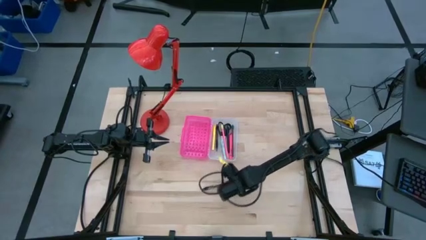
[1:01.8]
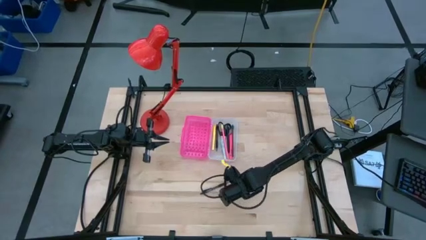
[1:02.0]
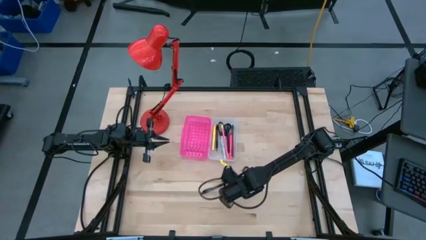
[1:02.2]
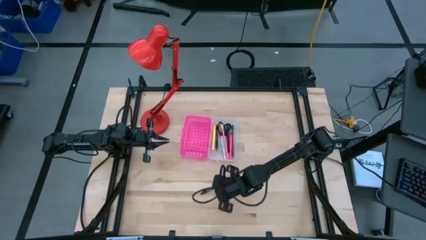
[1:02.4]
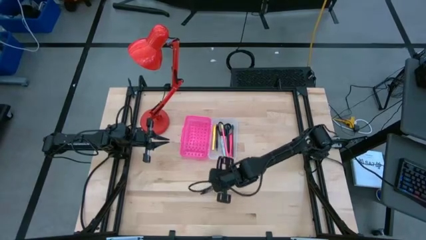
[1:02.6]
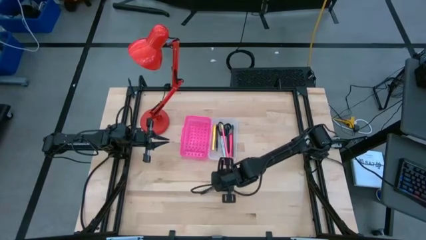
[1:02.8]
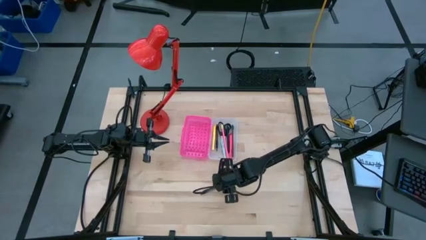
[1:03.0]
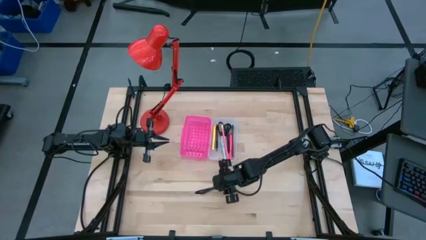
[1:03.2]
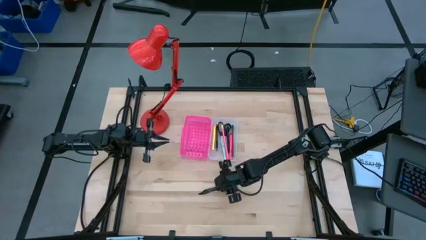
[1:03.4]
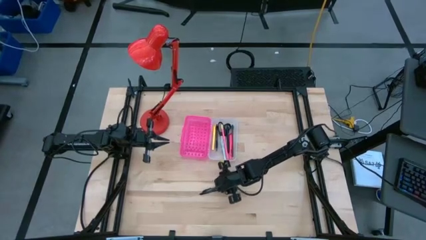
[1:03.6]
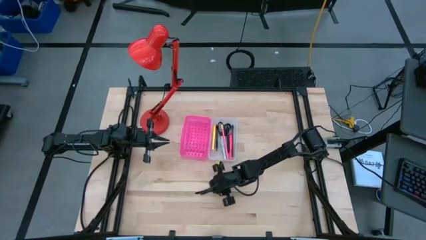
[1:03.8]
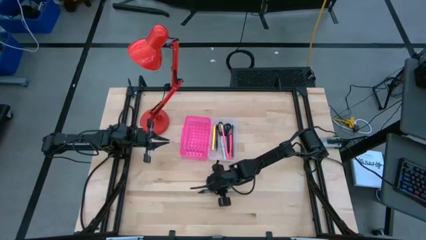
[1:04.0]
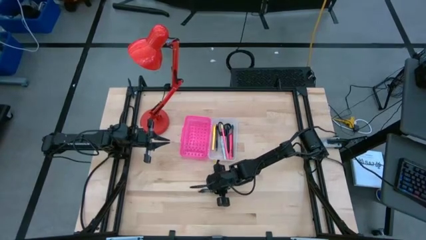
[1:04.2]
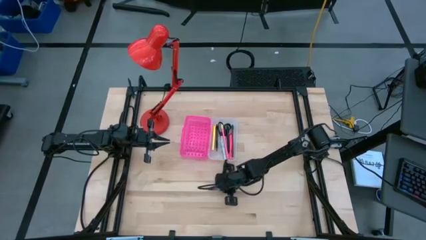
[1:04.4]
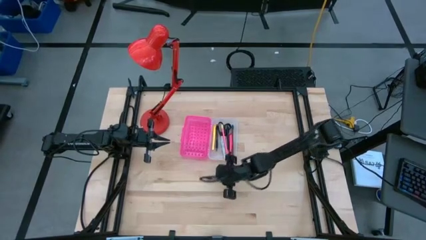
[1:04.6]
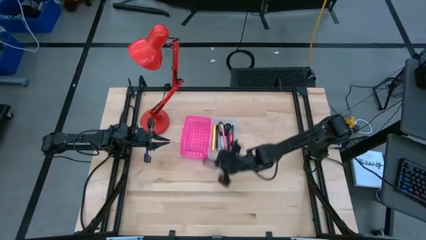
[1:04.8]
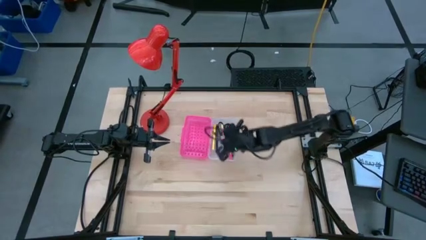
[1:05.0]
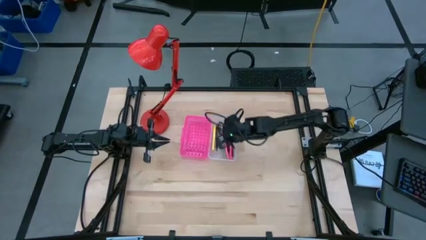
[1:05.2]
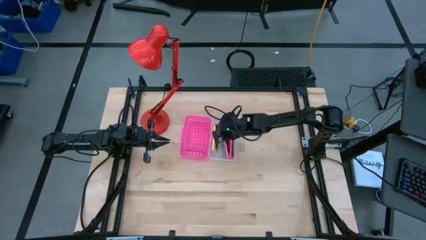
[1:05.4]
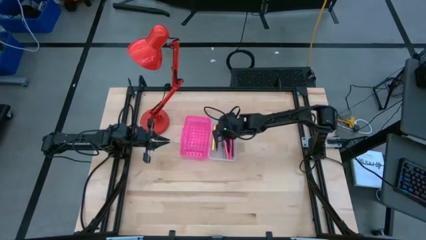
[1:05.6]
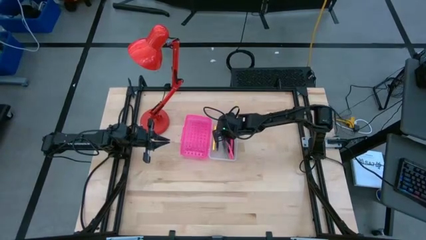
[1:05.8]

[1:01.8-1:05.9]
Task: Pick & place school supplies into a supply box
Put the black pen into the supply box

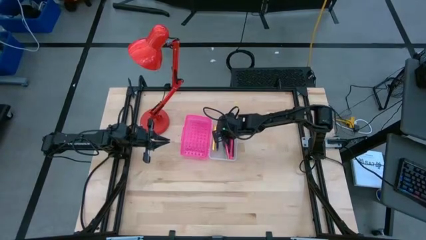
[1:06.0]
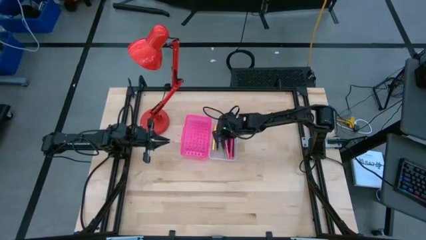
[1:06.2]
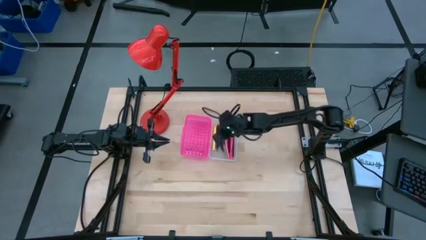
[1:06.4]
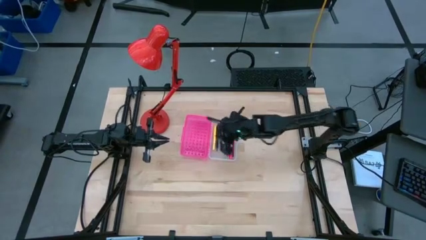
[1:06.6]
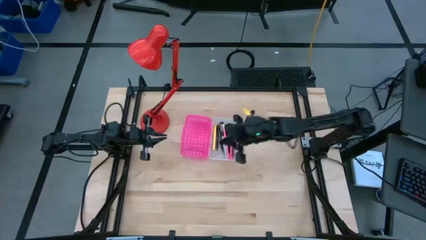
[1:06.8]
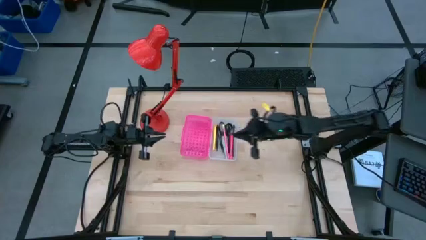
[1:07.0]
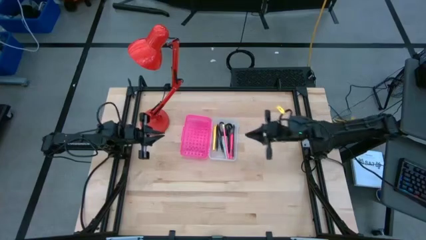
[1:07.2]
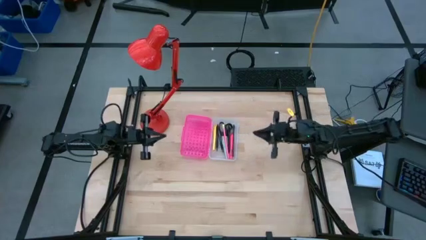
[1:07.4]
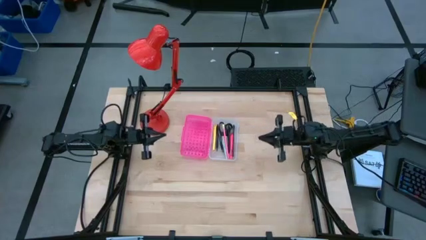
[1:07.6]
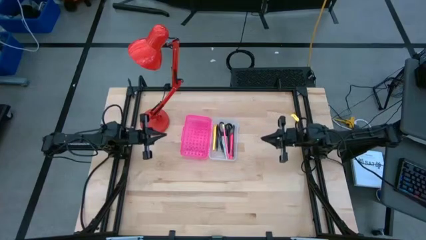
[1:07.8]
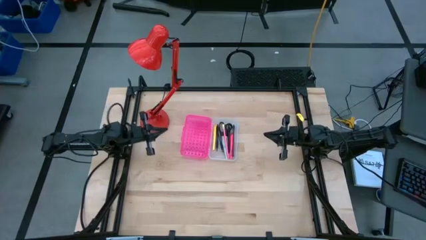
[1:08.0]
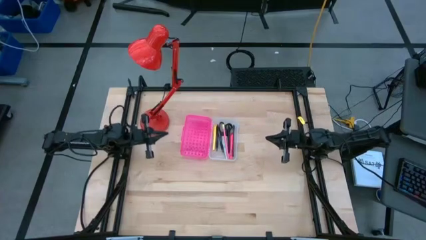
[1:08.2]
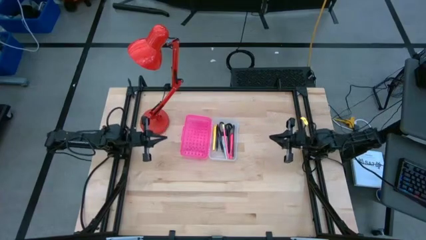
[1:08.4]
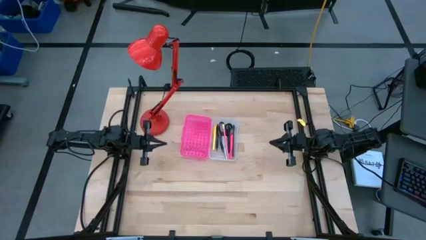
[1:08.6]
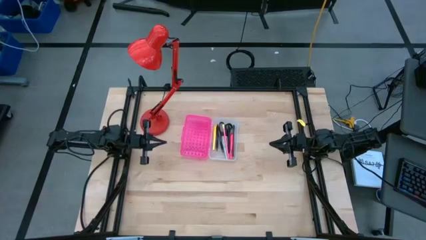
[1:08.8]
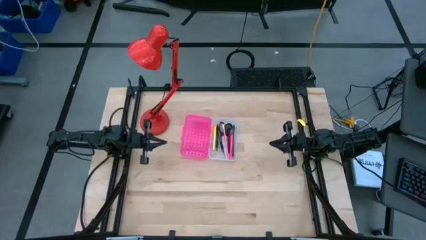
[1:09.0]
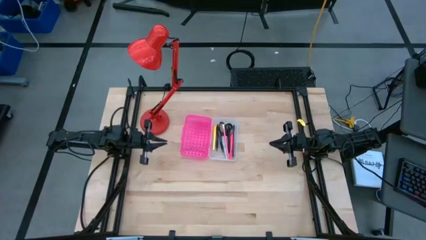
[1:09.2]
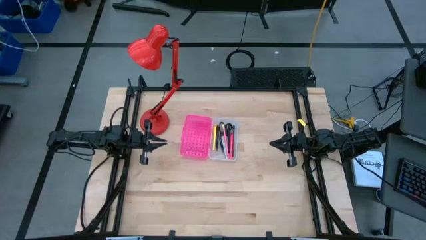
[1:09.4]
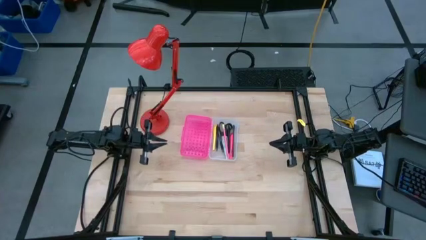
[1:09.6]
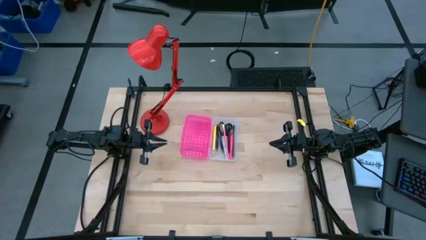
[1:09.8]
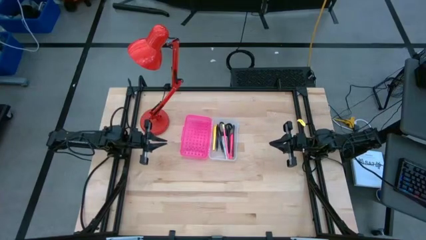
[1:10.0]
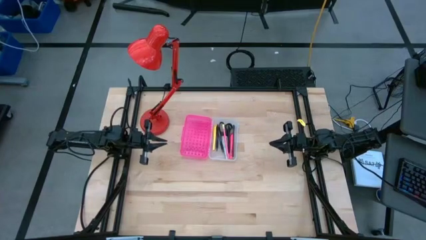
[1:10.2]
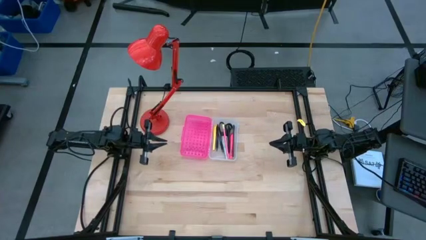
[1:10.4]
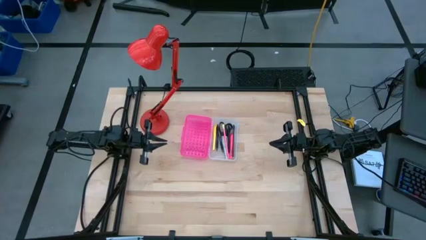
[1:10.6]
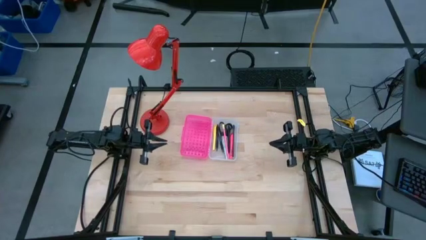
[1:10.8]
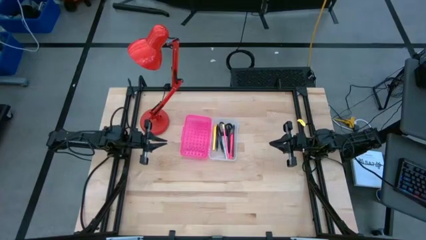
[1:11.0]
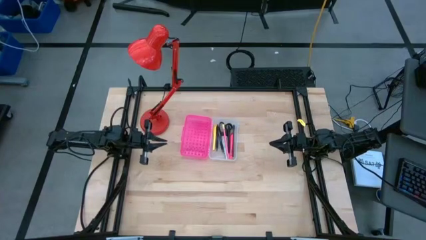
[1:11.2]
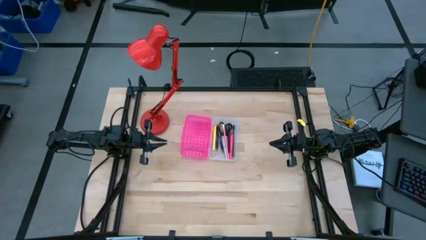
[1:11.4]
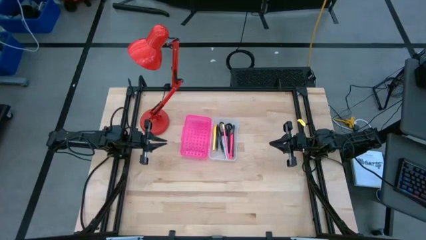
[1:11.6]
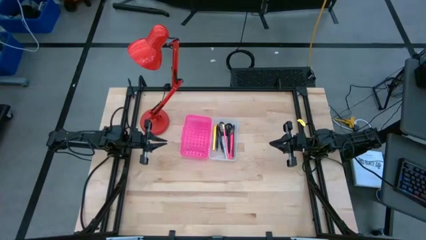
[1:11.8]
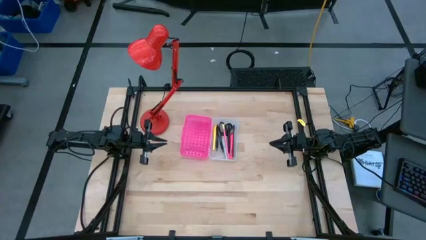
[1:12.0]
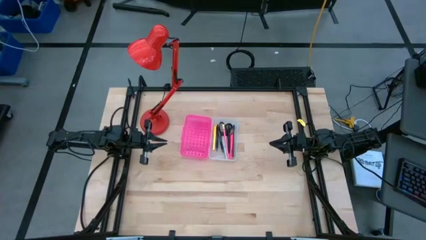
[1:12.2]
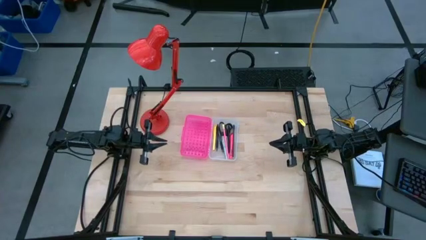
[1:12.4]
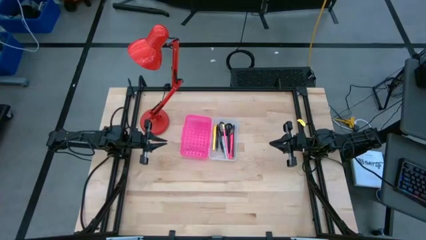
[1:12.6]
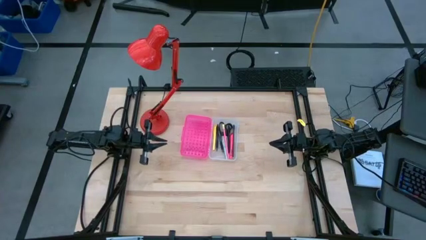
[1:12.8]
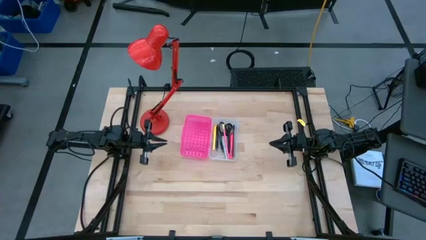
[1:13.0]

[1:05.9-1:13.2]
Return to Home Position

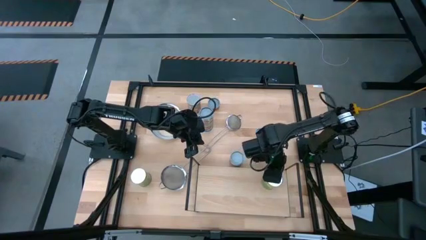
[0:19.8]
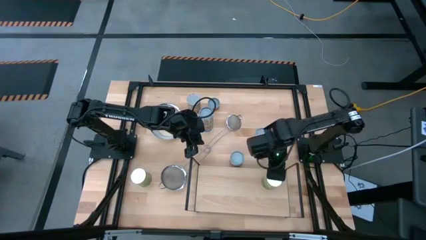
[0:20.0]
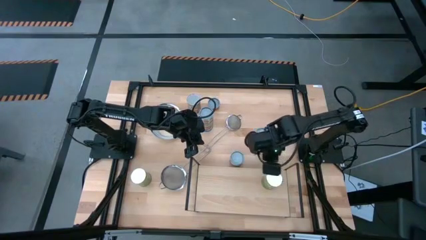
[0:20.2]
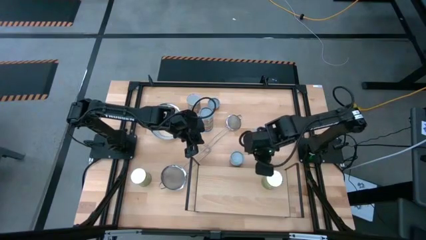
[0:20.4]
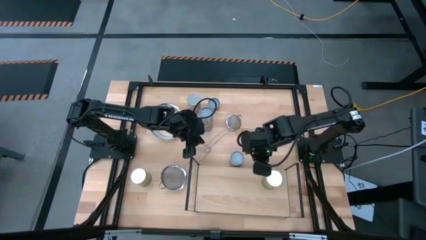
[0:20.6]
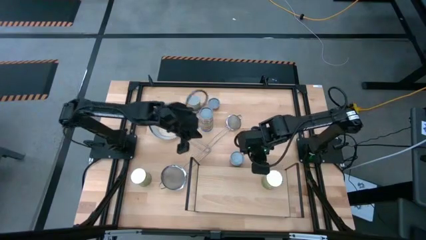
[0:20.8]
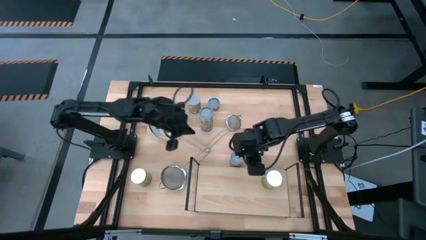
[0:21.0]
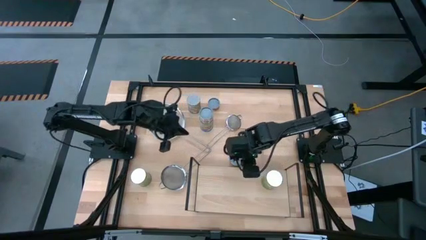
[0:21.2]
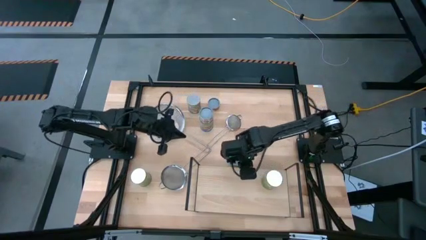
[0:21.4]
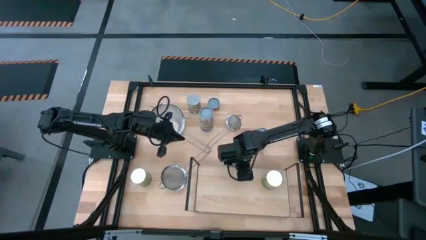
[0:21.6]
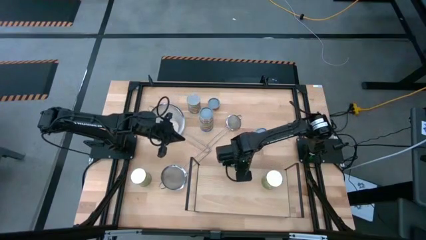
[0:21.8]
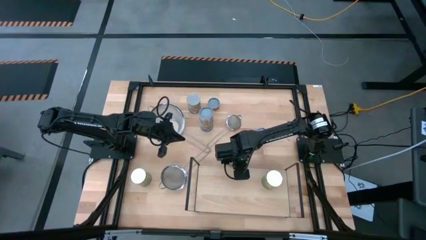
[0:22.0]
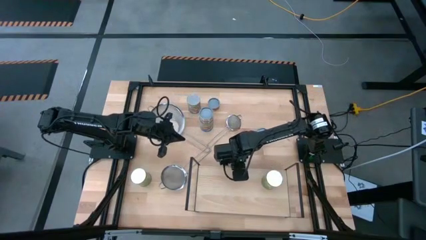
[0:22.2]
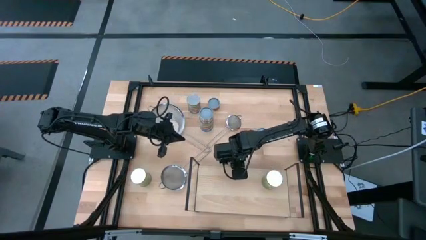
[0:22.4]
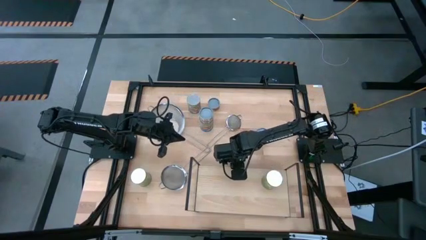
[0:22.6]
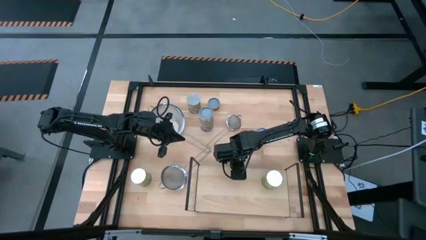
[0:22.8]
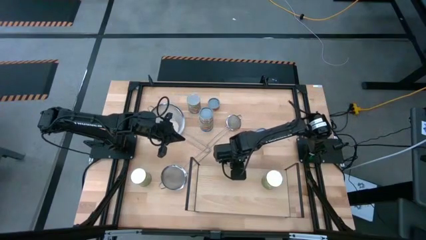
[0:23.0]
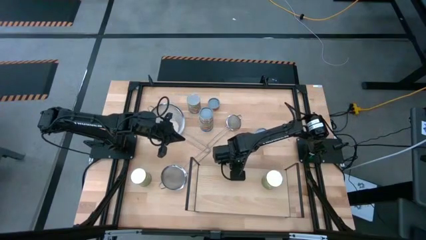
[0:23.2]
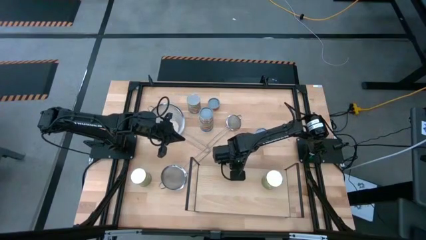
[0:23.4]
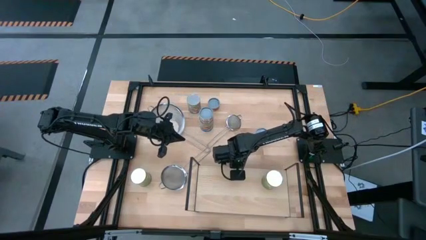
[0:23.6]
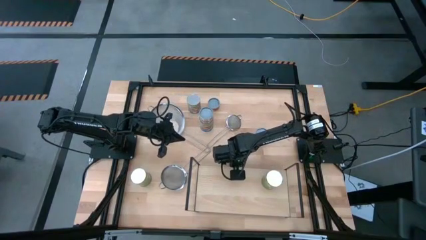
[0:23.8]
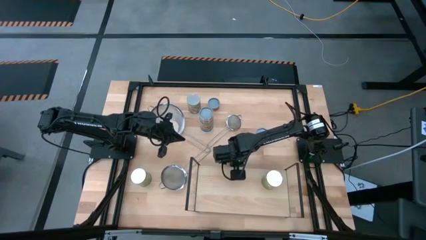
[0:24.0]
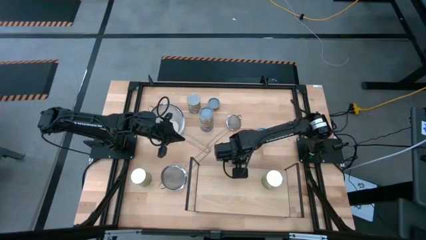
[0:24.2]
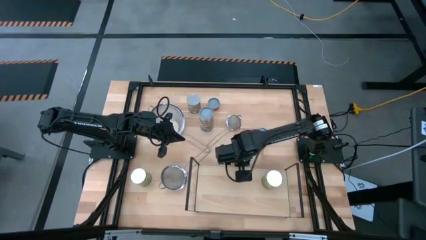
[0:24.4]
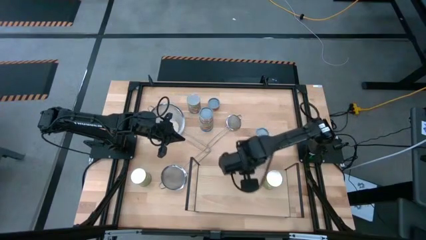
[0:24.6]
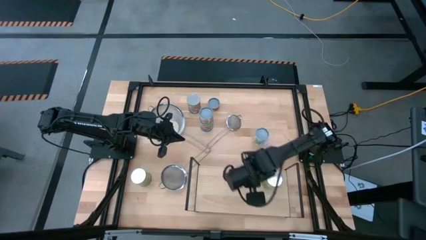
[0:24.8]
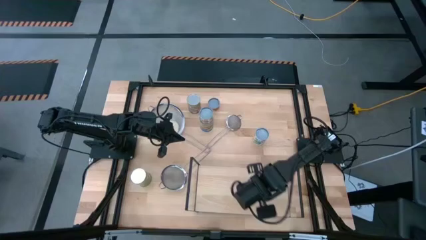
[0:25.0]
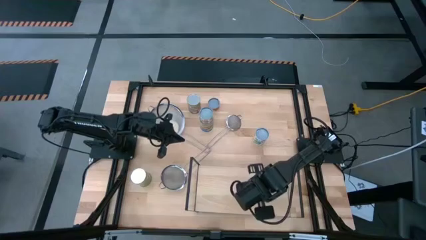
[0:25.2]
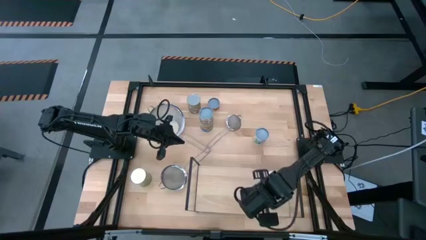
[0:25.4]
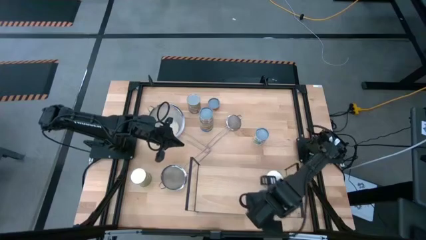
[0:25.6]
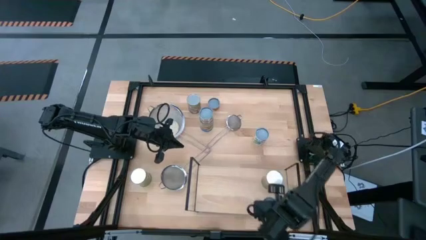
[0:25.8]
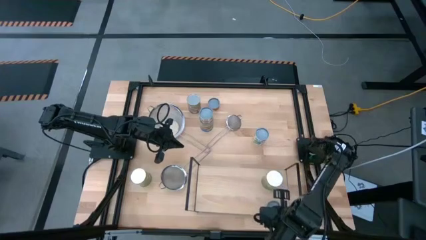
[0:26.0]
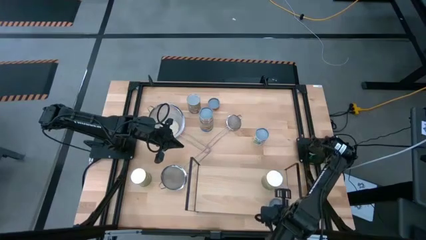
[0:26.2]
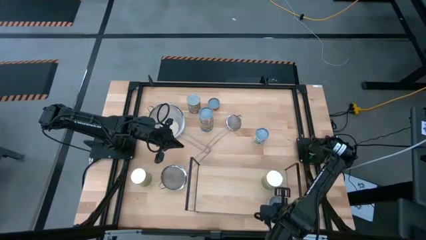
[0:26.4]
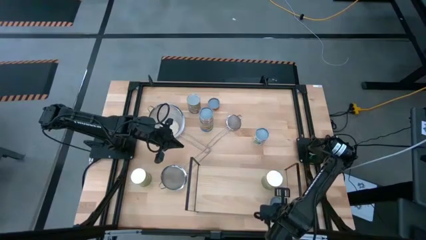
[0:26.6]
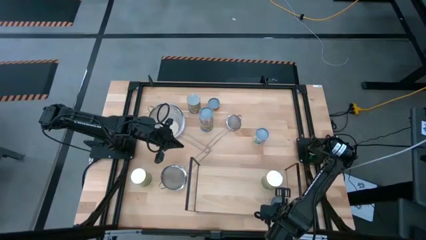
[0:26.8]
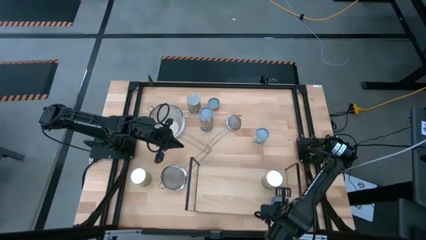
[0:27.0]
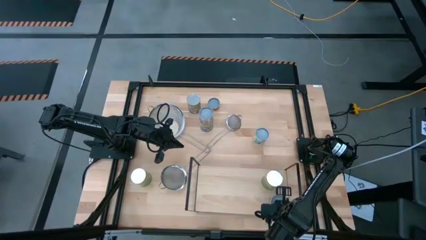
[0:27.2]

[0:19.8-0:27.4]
Task: Pick and place cans onto a shelf
Put the small canned oranges on the shelf
